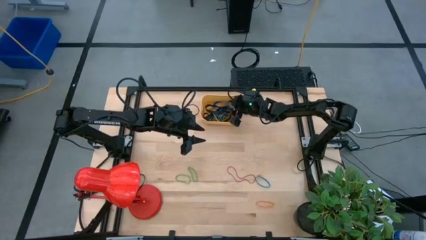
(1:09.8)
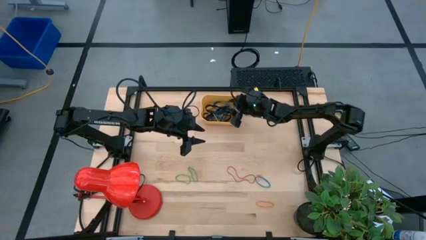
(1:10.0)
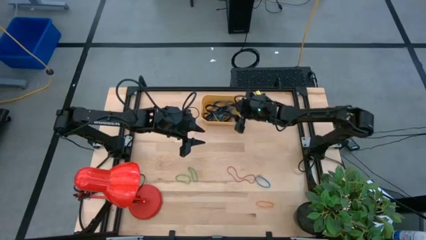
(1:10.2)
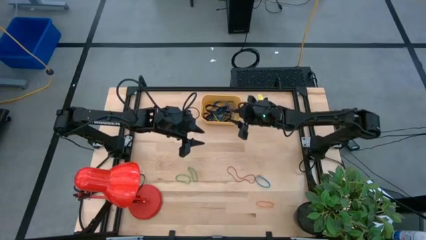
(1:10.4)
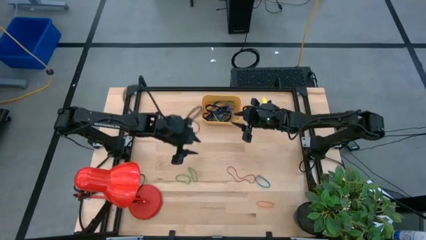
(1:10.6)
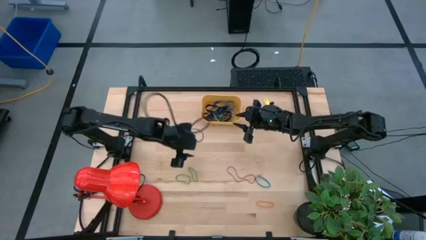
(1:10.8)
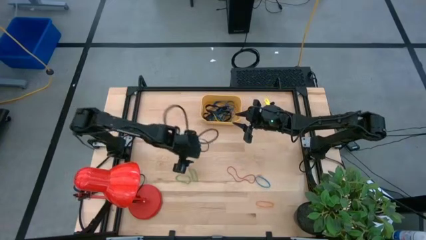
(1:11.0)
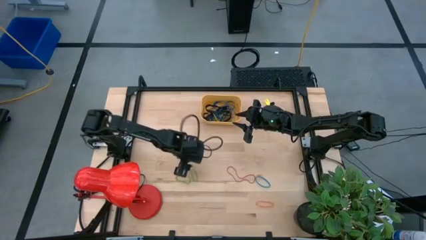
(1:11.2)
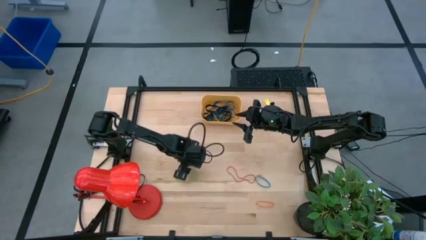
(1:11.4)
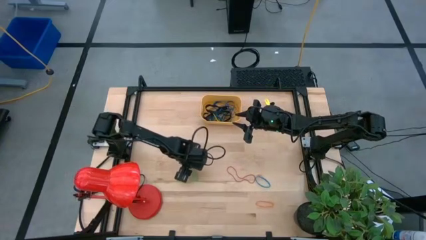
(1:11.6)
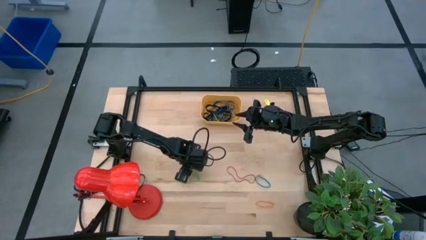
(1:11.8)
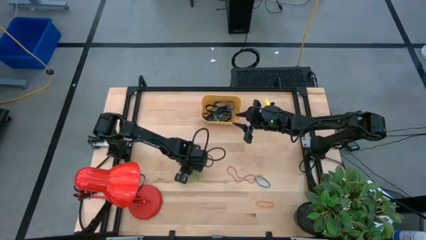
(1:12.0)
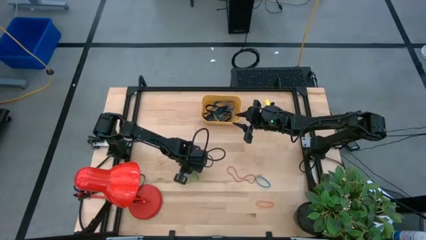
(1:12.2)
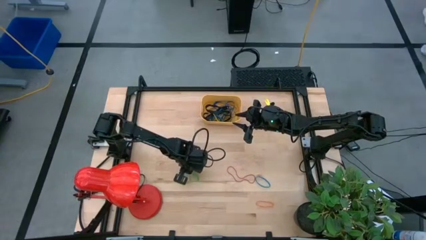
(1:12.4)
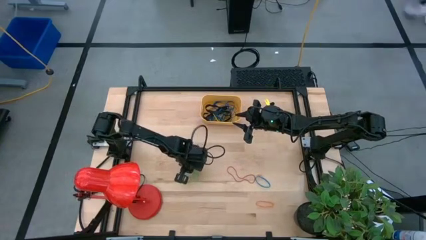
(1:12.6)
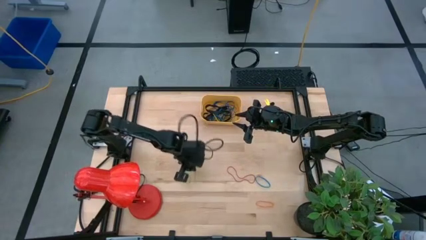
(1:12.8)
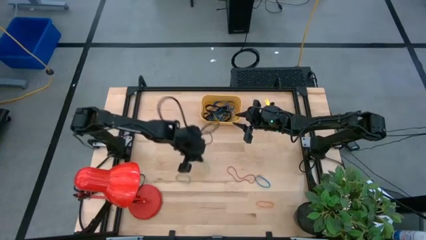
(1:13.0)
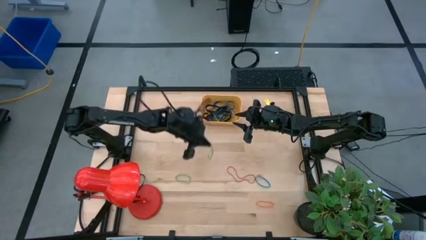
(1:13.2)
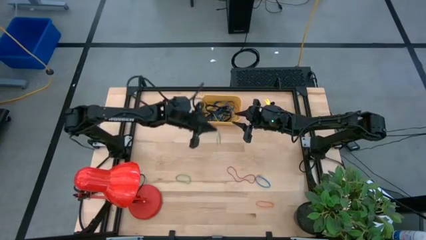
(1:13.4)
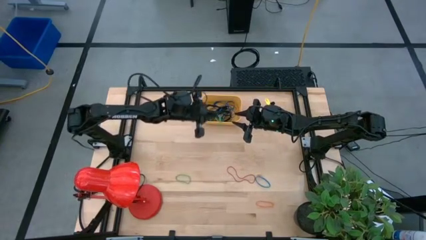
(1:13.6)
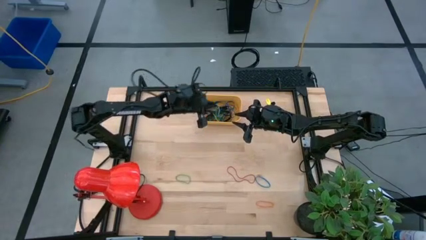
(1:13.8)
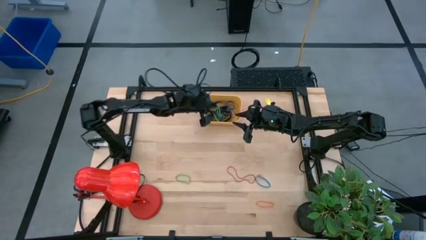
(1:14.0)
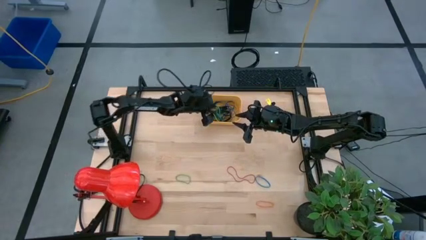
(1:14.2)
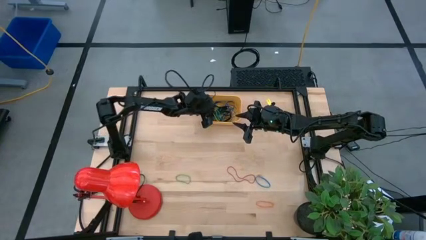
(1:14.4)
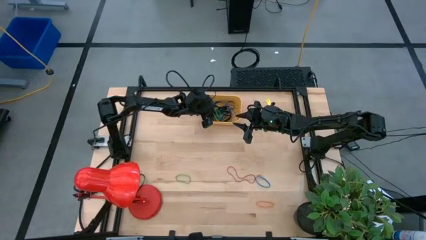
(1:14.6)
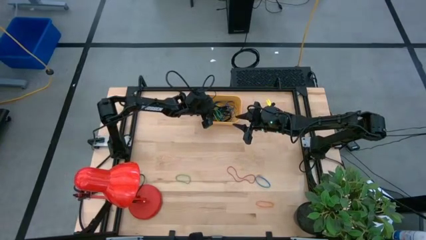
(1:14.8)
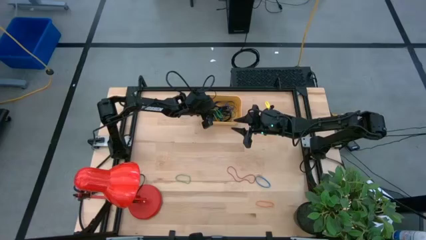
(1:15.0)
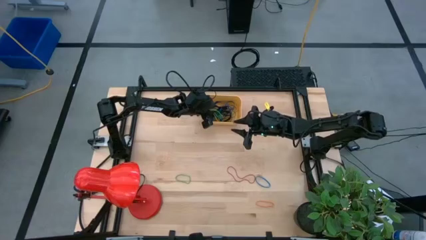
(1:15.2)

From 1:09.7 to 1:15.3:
Task: Pick and place rubber bands into bin
Put the right green rubber band into the yellow bin

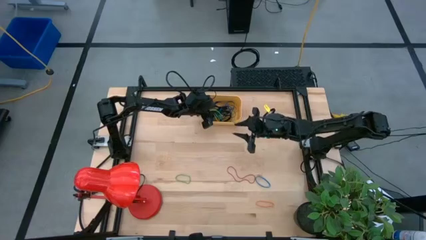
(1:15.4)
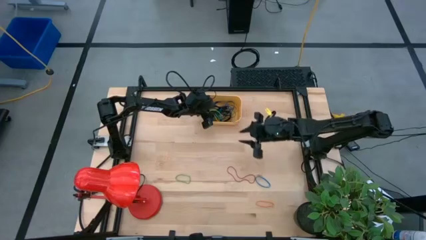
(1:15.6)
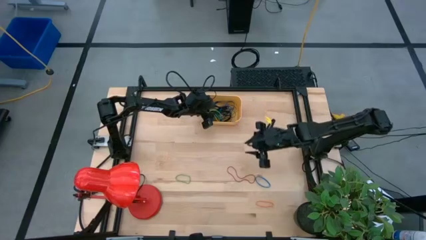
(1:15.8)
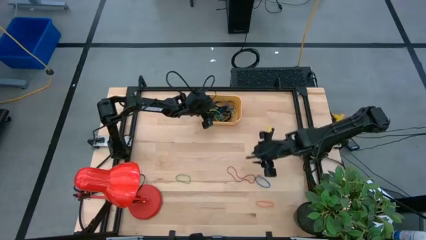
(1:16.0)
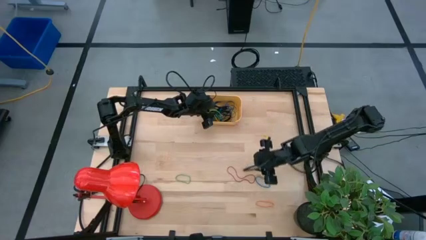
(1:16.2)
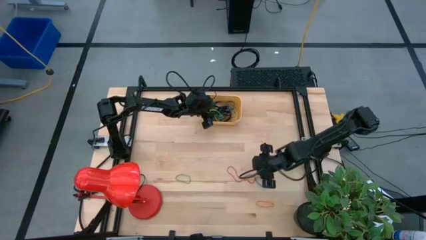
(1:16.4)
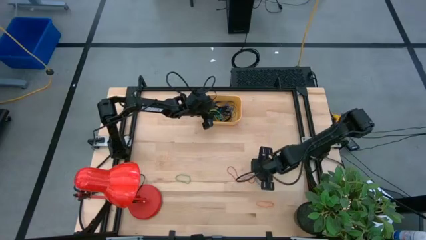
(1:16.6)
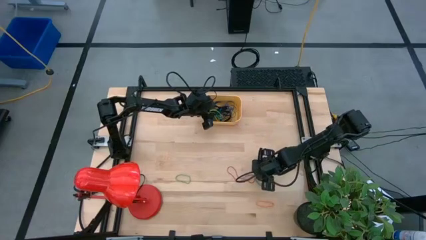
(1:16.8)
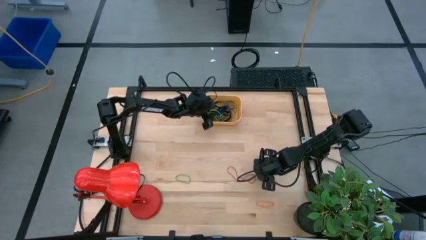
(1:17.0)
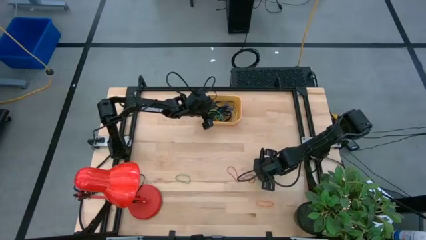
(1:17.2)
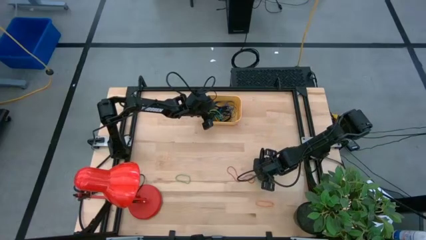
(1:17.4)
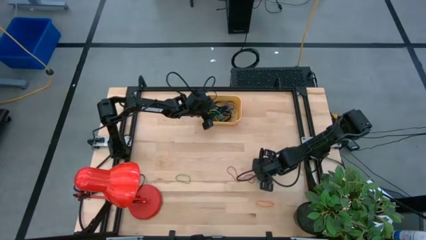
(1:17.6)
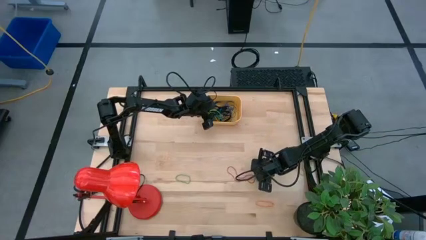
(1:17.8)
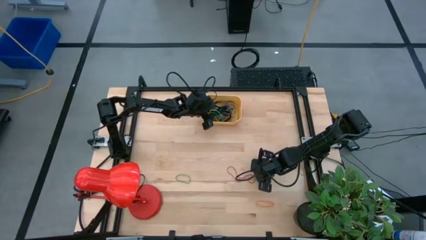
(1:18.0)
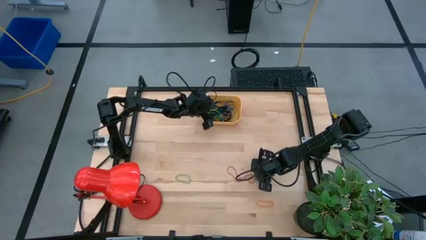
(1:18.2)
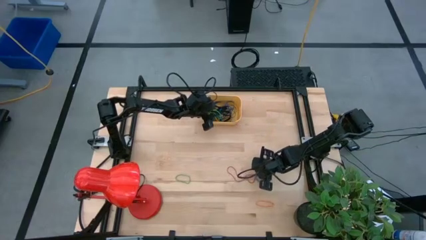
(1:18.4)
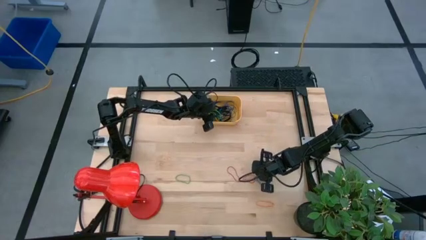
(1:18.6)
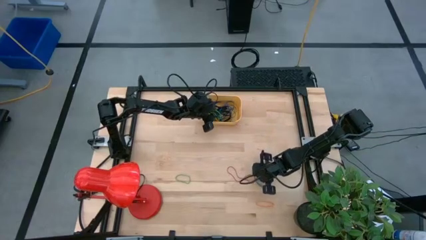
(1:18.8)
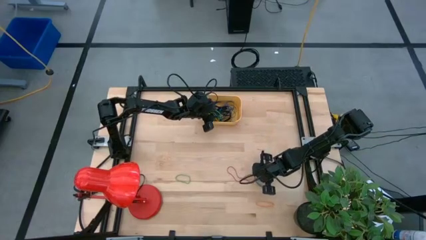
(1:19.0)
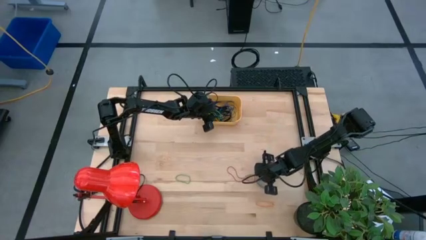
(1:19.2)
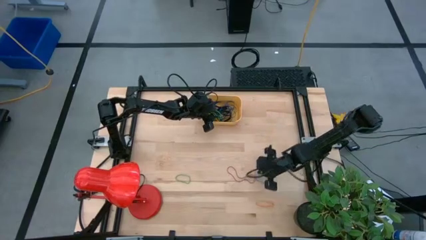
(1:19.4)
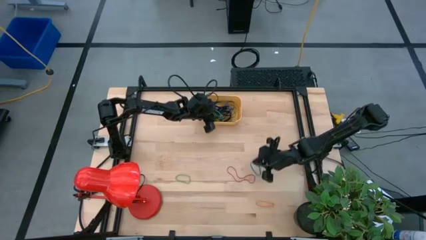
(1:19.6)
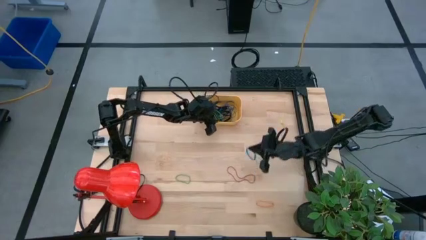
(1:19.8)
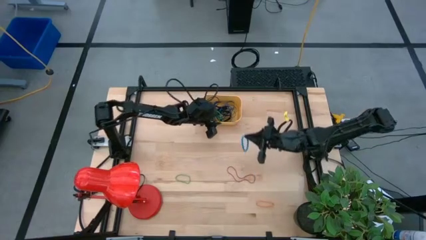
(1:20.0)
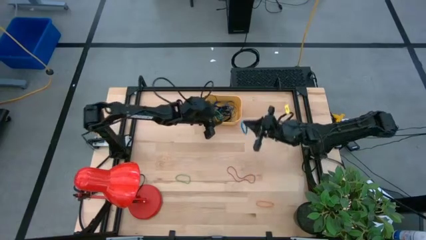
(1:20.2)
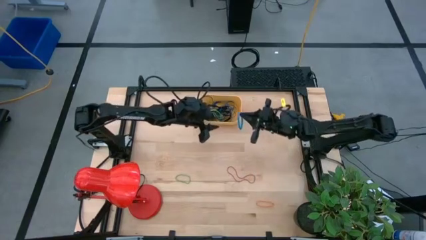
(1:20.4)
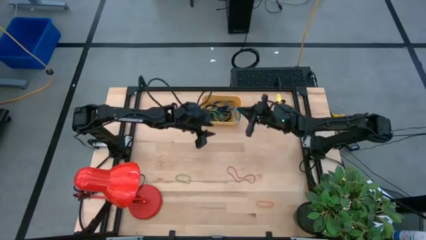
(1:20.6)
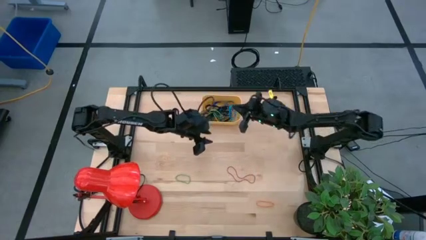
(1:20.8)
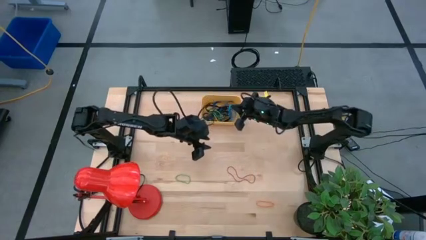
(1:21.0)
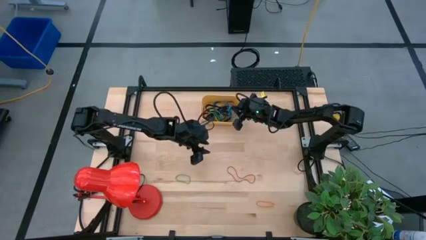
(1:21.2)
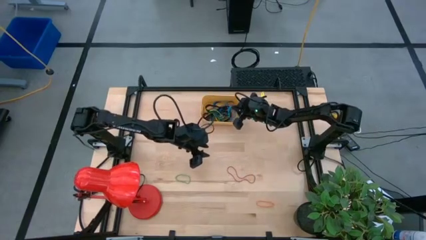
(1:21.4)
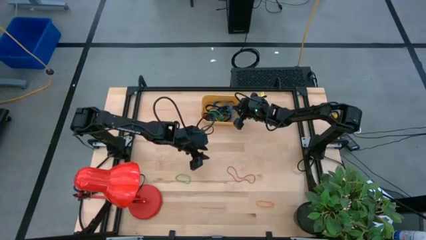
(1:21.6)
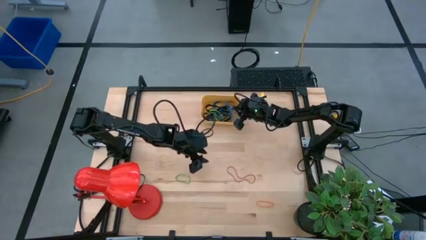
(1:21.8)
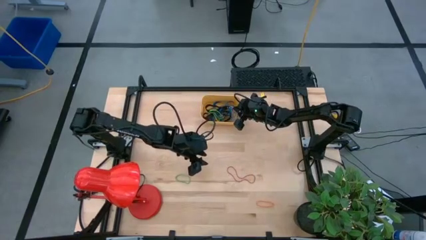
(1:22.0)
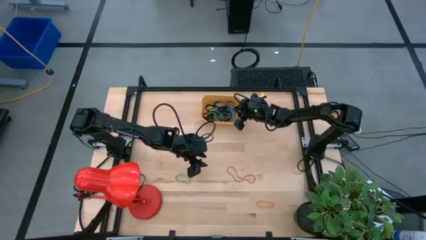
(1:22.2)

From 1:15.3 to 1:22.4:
Put the blue rubber band into the yellow bin

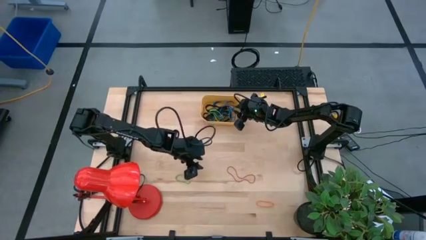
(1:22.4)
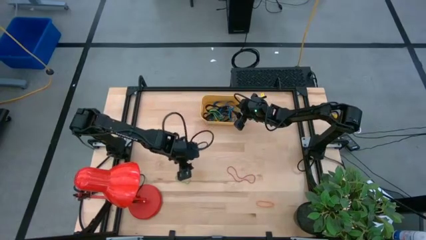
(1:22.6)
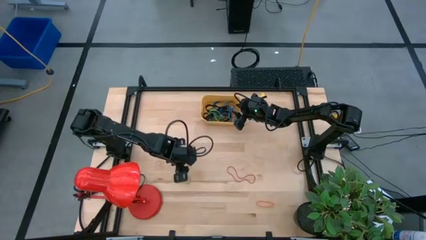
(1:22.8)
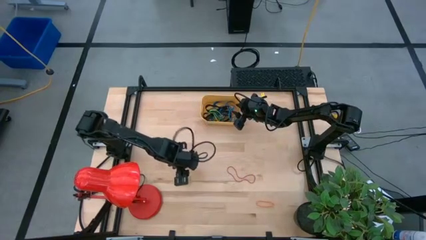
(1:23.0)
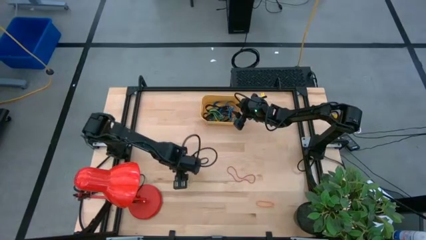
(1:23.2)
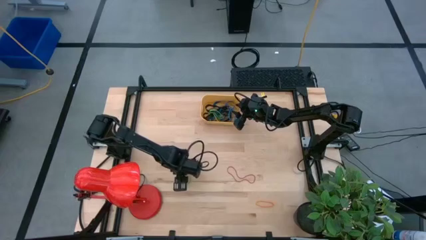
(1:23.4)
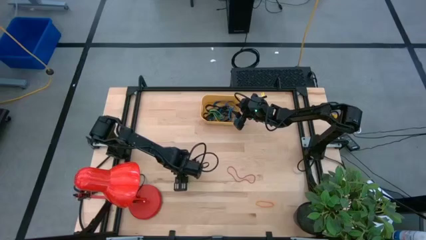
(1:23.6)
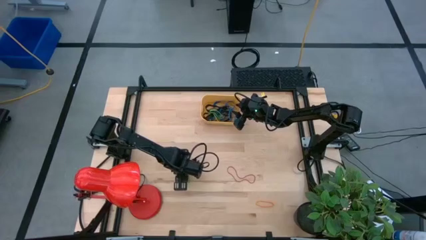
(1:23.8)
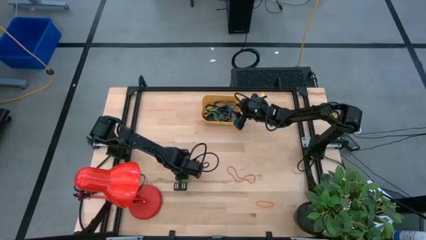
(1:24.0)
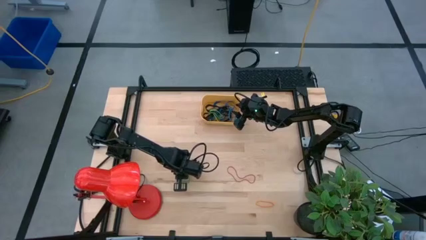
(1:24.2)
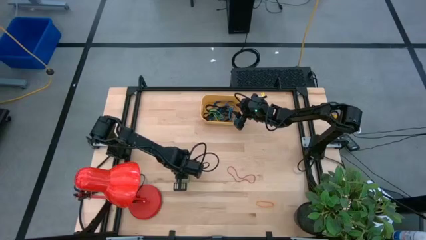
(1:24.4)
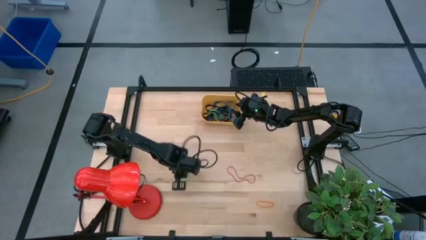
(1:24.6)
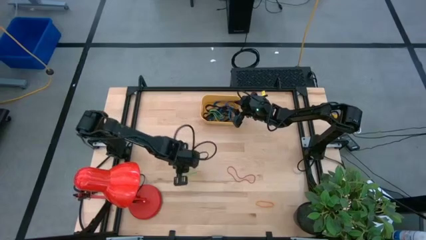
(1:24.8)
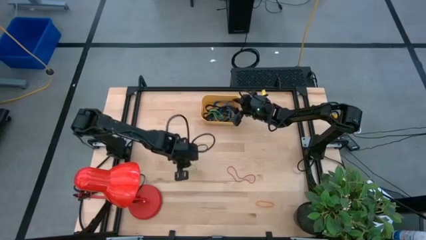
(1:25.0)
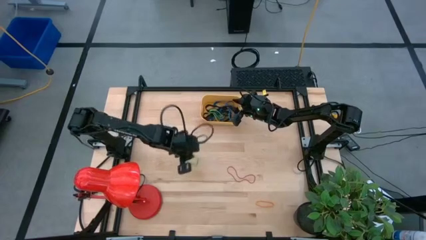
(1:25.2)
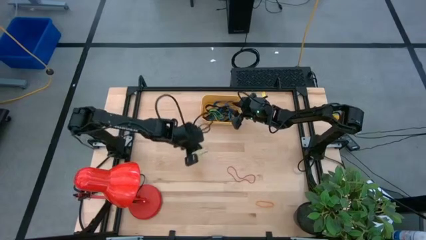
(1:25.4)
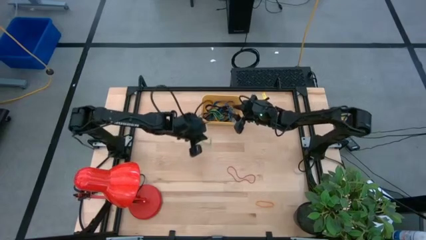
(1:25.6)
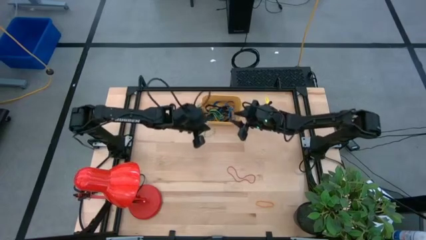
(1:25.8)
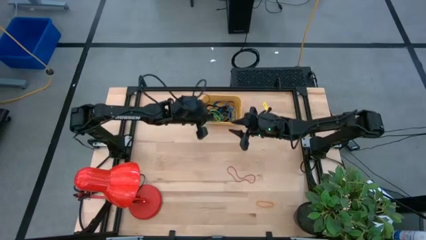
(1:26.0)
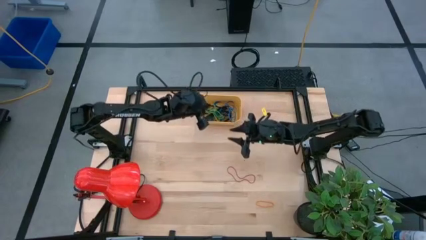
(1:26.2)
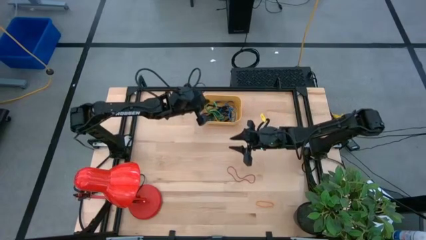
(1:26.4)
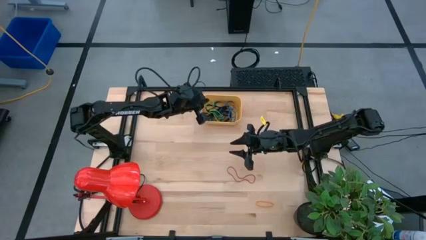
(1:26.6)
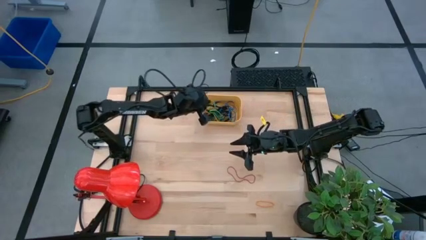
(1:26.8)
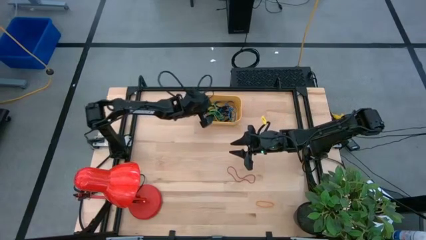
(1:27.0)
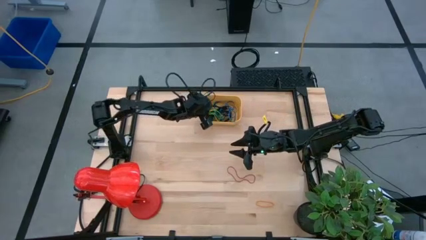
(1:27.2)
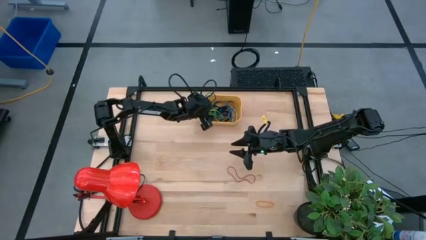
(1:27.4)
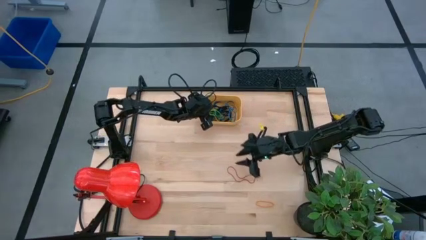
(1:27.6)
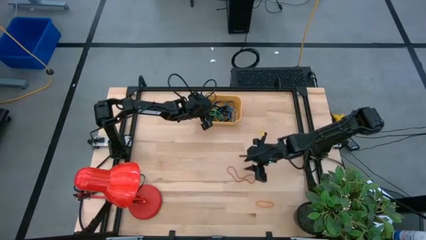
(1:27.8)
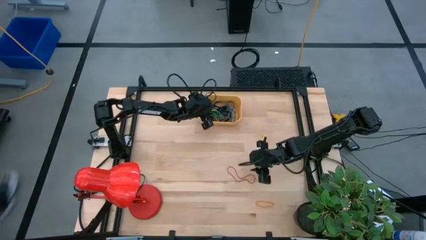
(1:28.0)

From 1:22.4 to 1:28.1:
Put the green rubber band into the yellow bin
